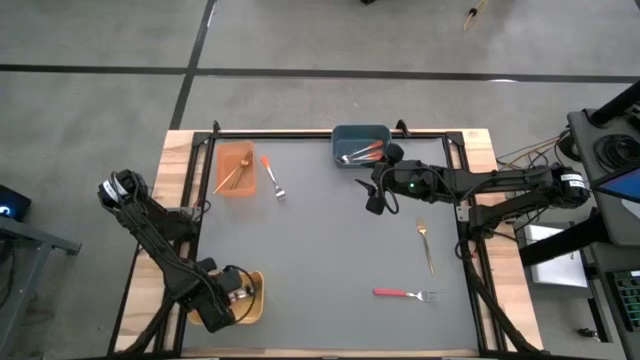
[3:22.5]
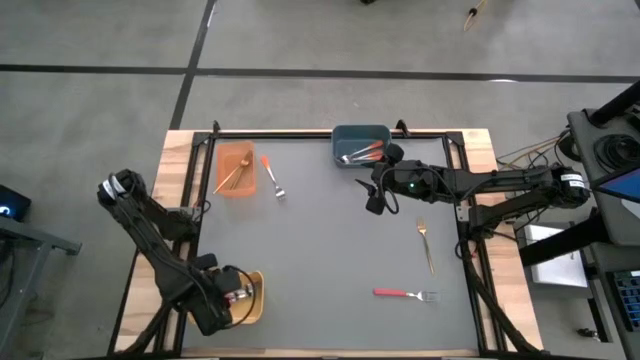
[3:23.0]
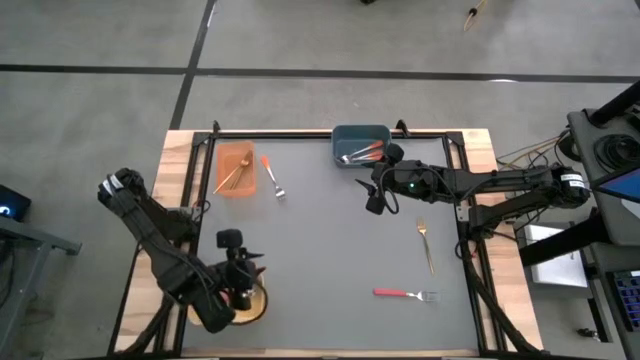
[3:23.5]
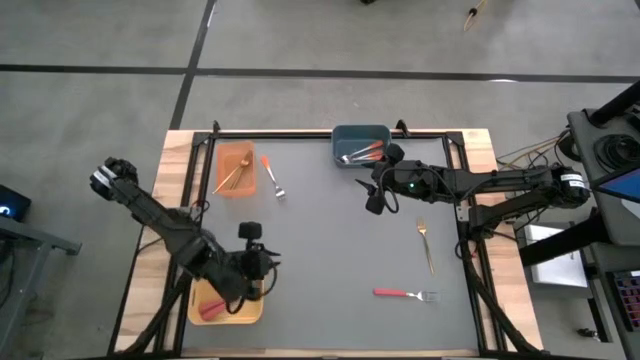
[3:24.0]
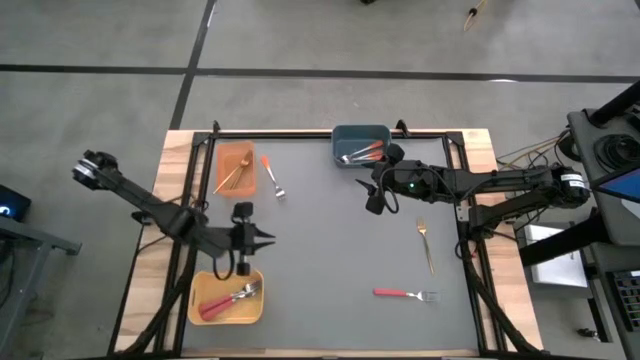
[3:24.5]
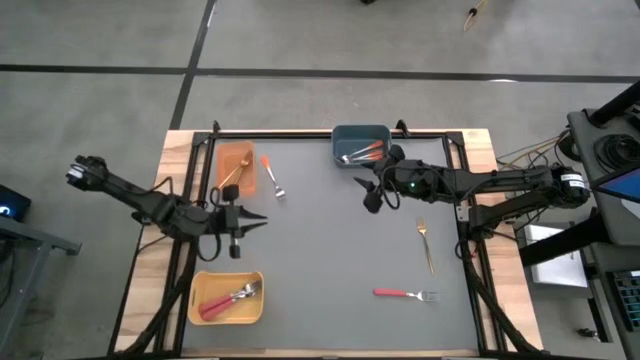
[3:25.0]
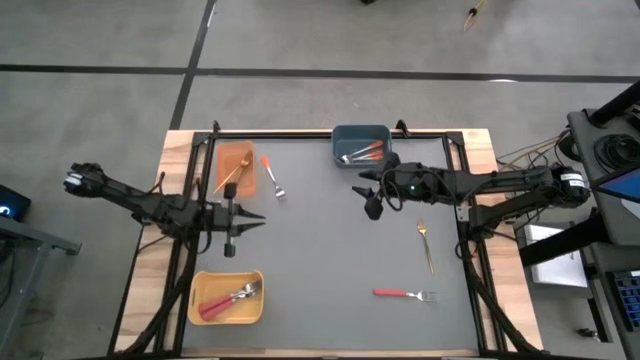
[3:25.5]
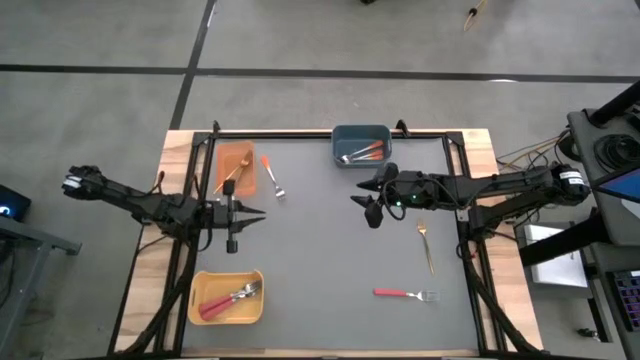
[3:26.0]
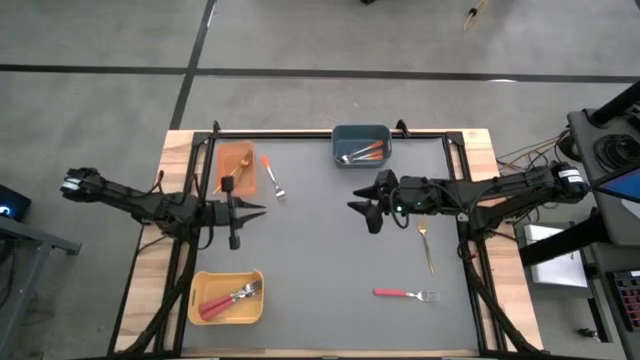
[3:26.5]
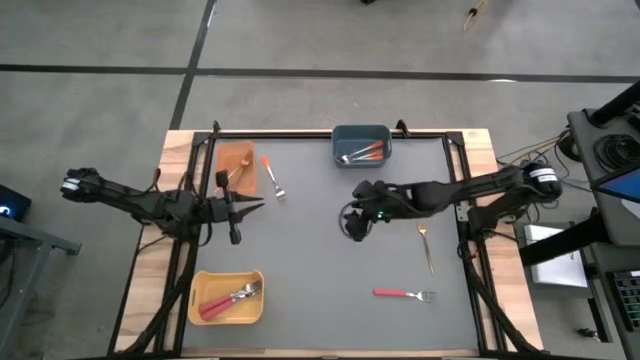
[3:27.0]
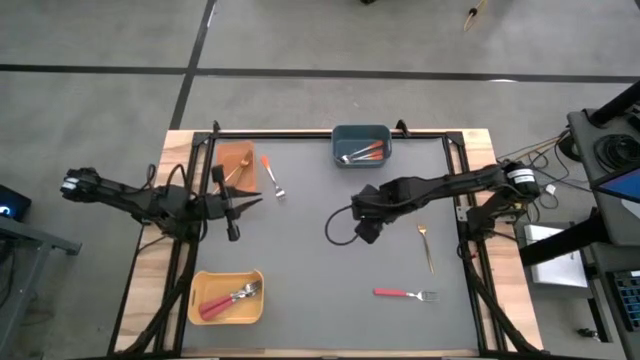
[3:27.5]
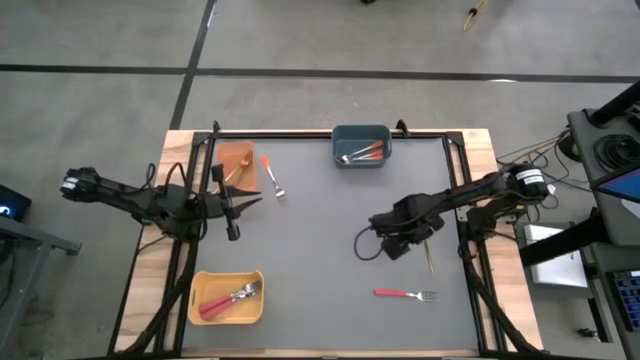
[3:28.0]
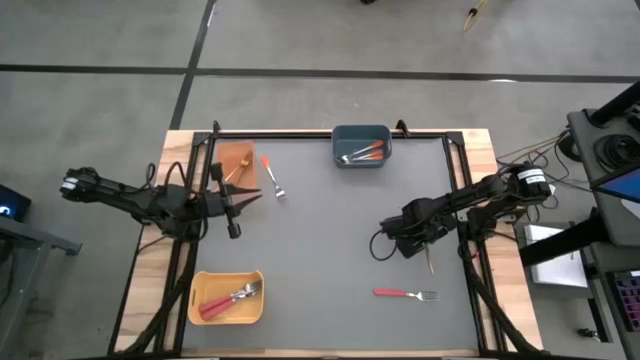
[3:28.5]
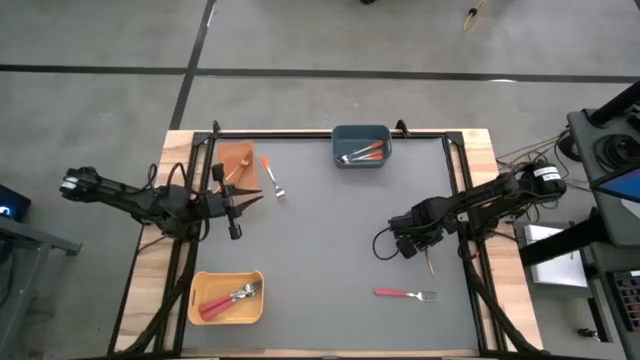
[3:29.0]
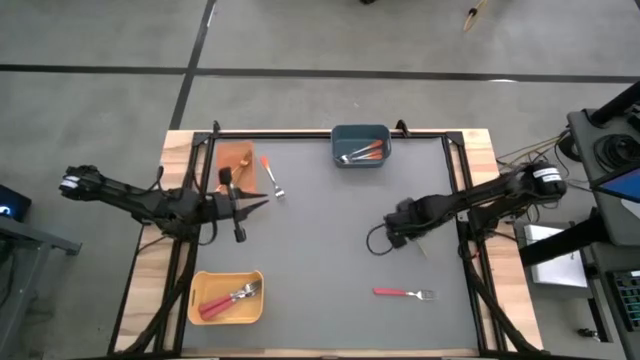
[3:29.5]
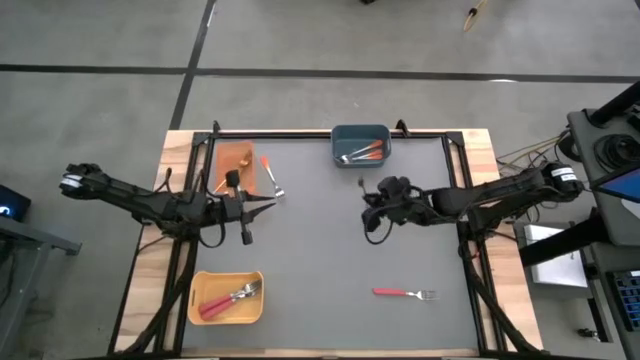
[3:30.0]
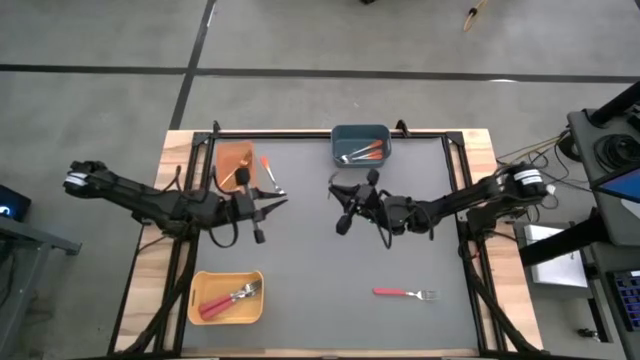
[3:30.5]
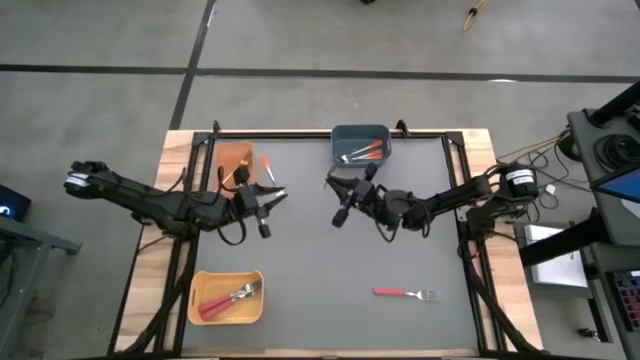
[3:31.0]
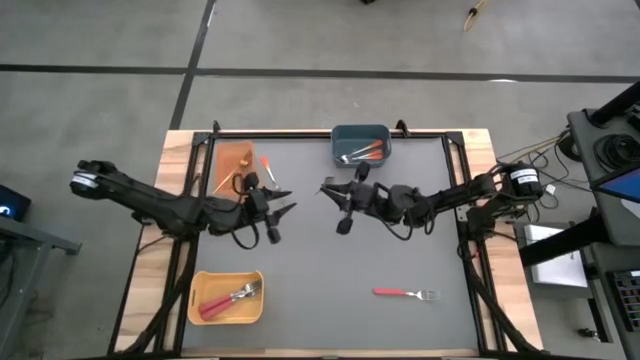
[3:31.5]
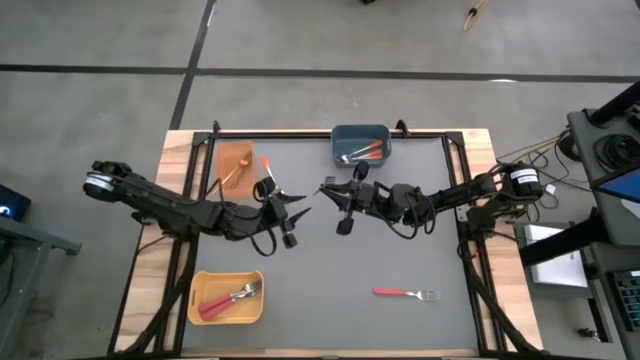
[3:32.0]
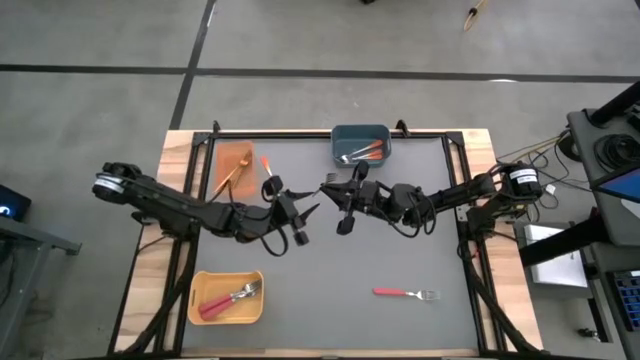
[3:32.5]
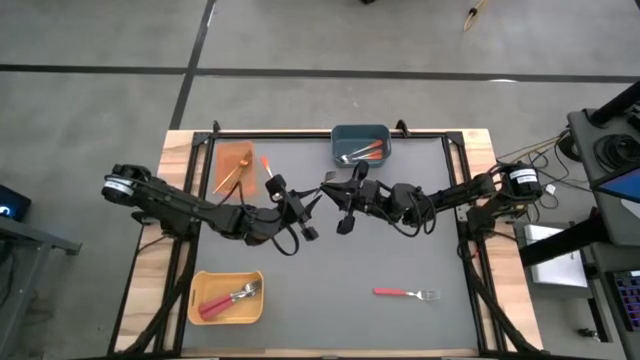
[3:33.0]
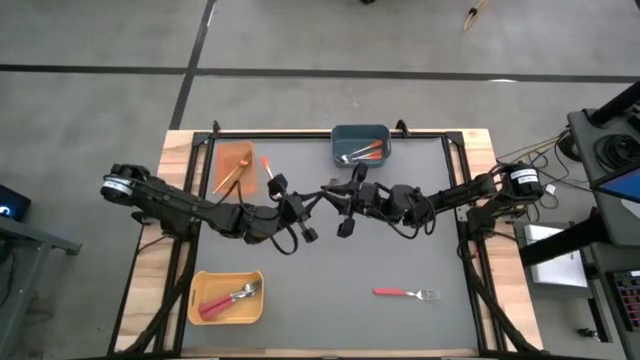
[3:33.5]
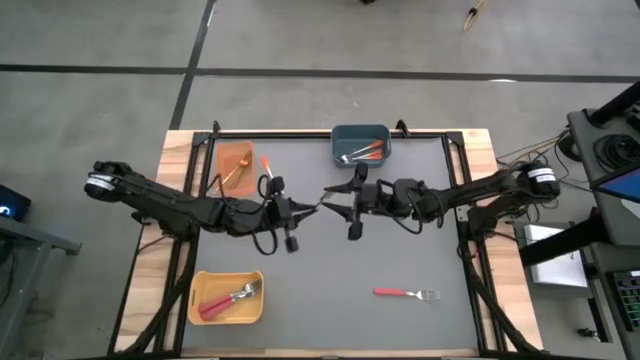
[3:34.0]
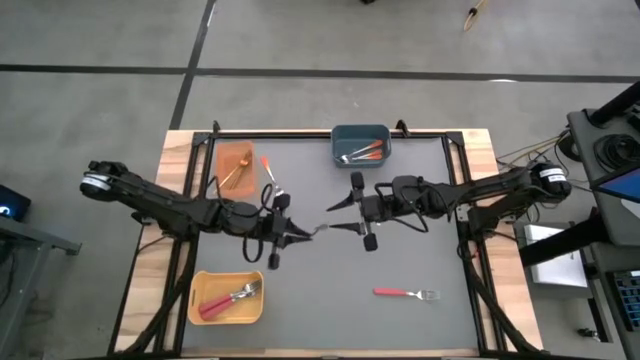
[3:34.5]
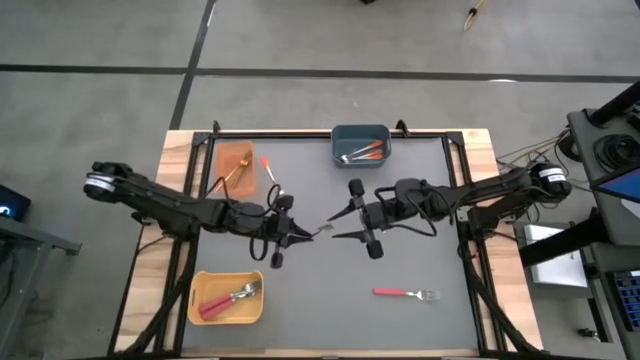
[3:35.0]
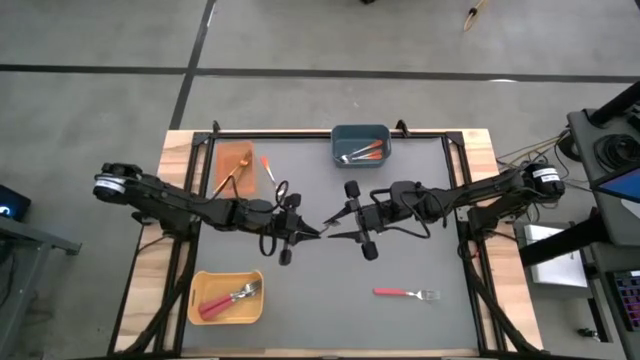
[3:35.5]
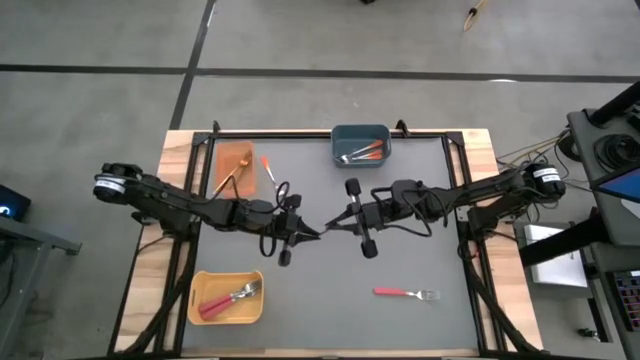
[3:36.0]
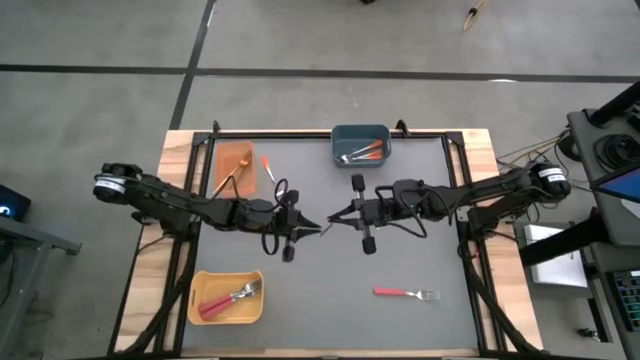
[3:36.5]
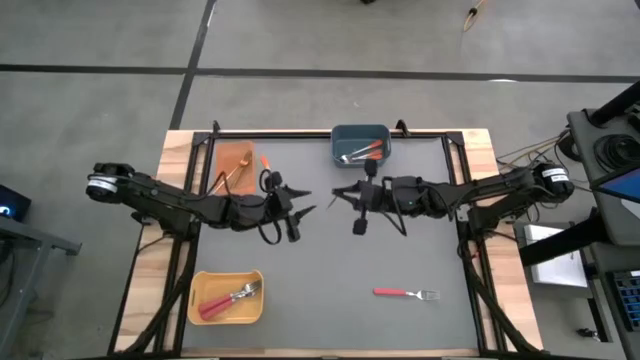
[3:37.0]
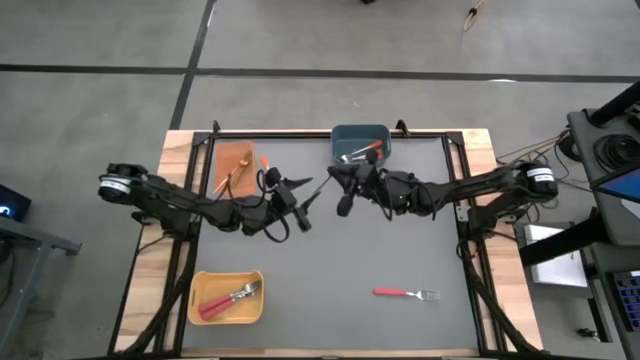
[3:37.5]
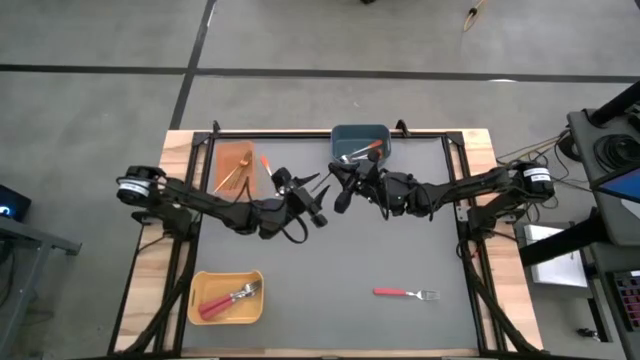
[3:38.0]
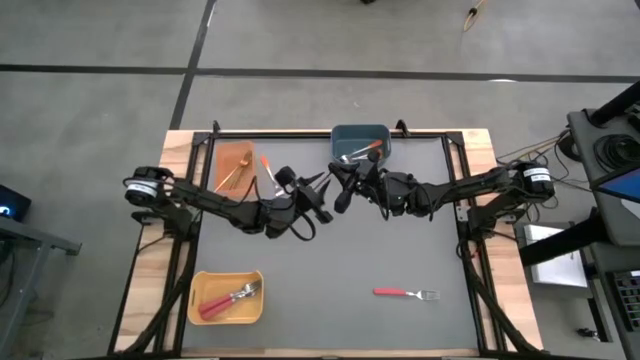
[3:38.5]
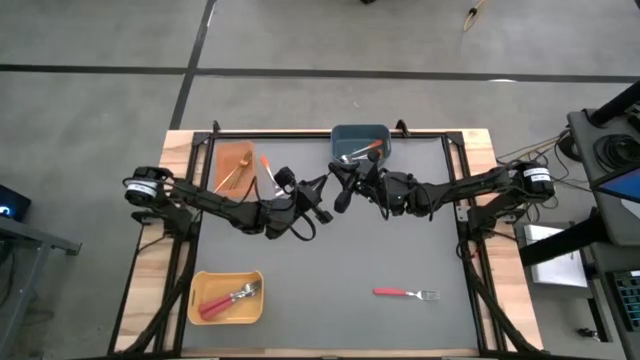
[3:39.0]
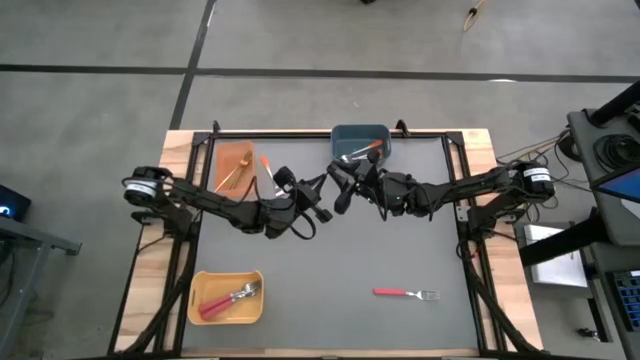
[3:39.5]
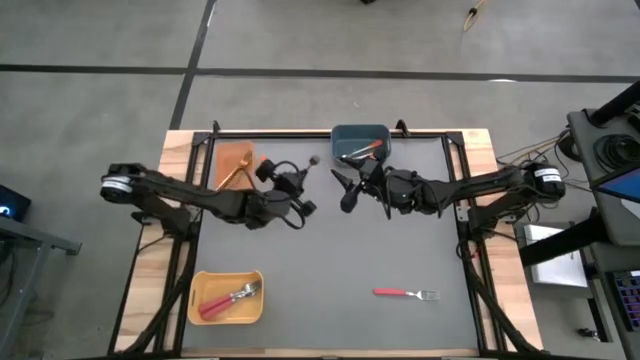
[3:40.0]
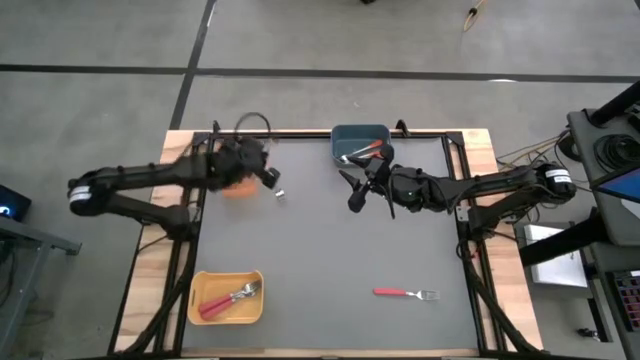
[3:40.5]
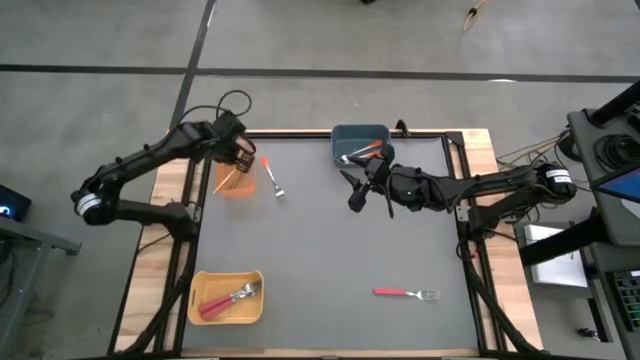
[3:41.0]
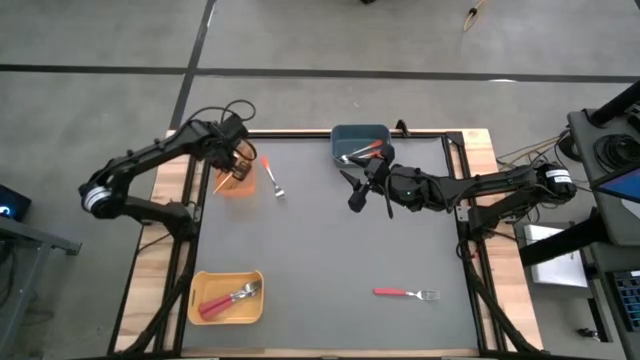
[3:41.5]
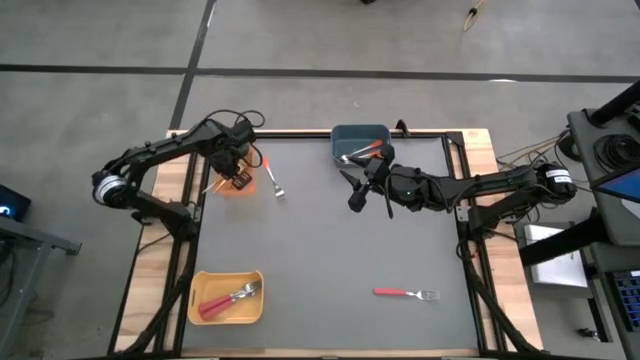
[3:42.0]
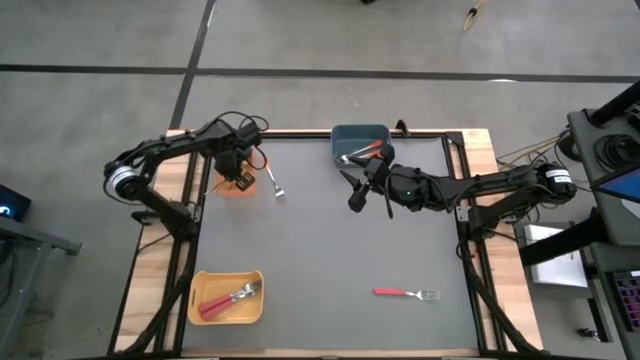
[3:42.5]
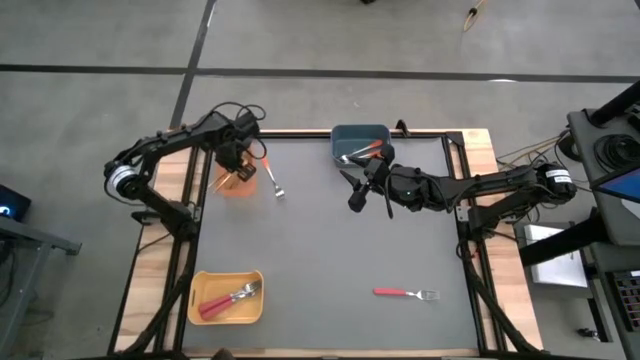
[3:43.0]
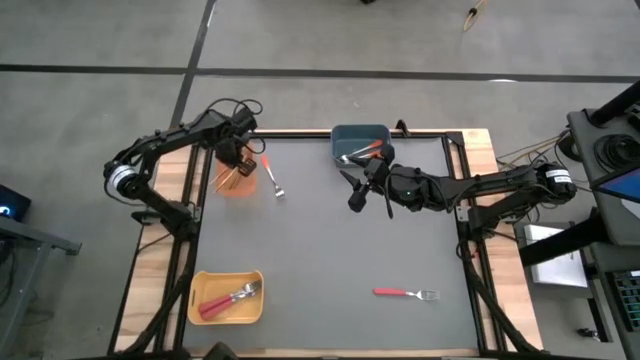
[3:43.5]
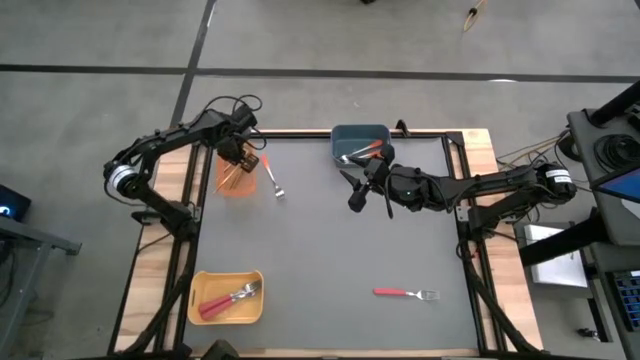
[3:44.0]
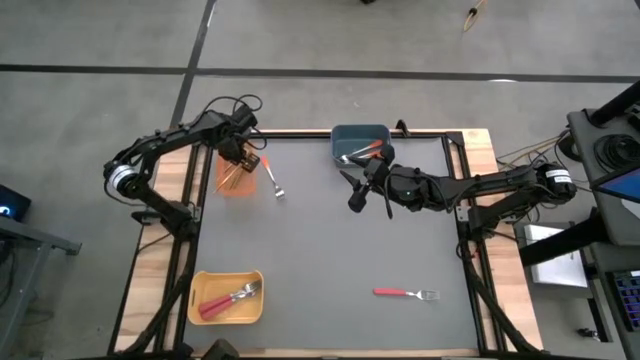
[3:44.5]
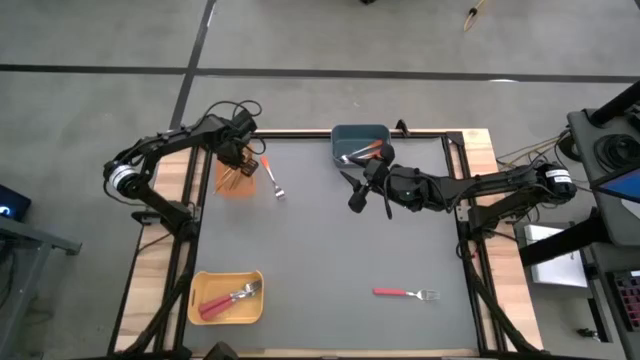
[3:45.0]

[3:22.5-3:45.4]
Task: Sort silverware by color (type)
Put the gold fork into the orange bin
